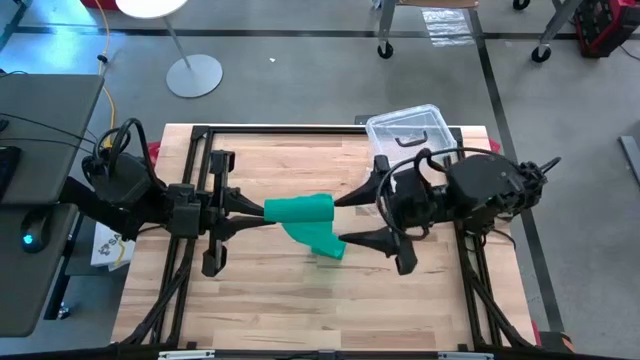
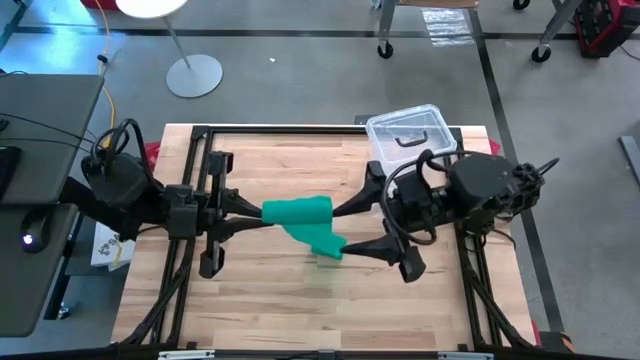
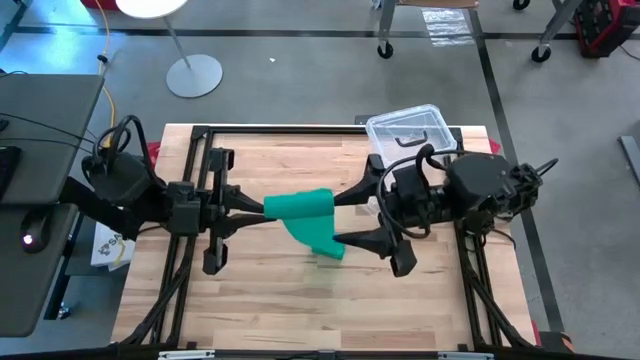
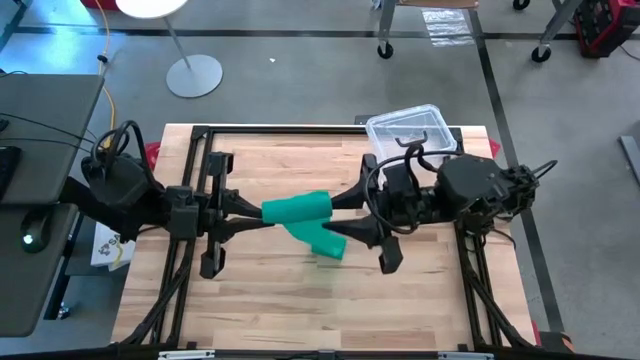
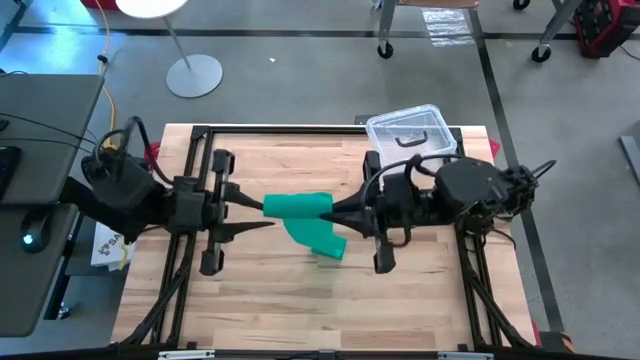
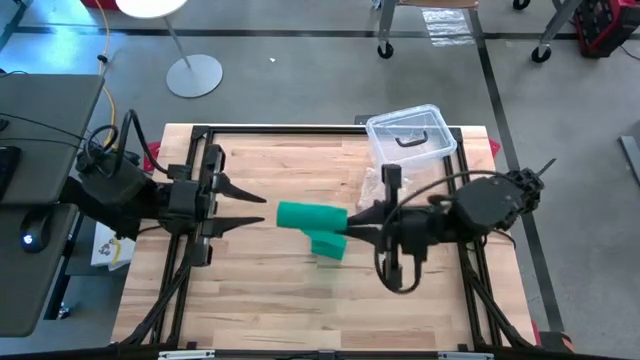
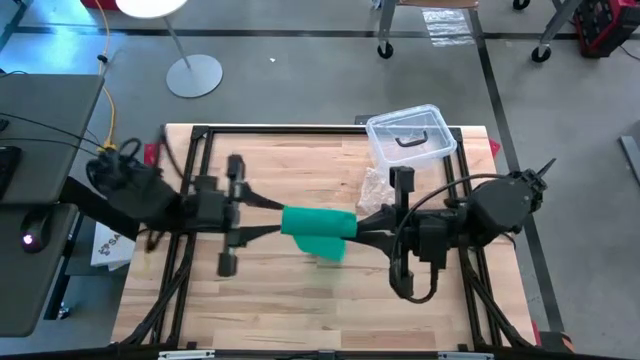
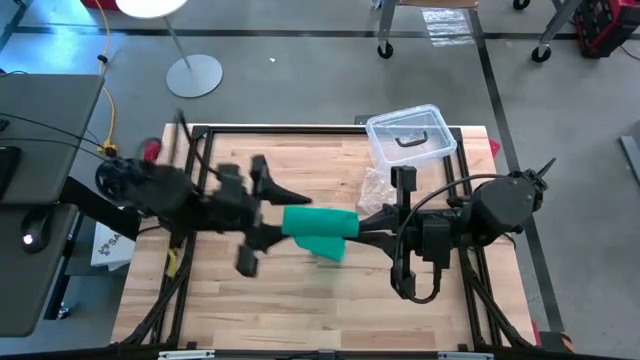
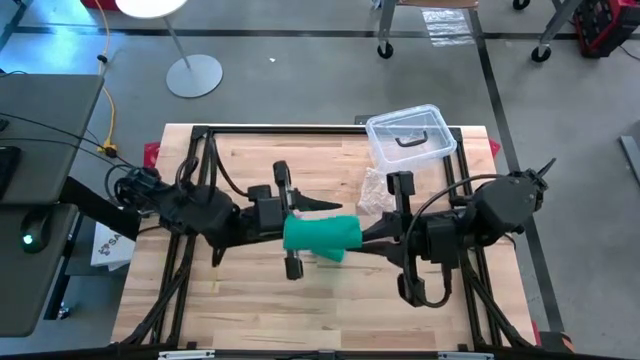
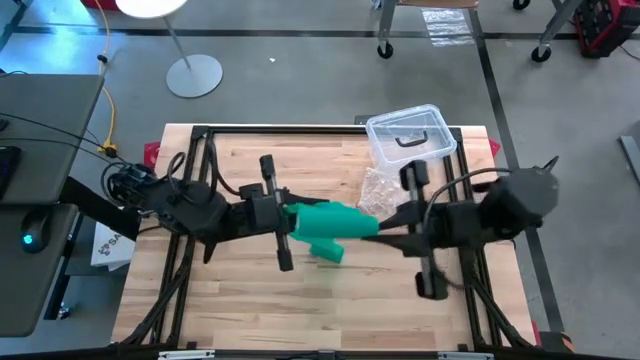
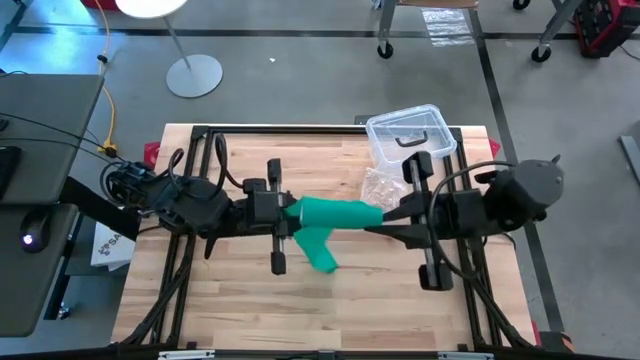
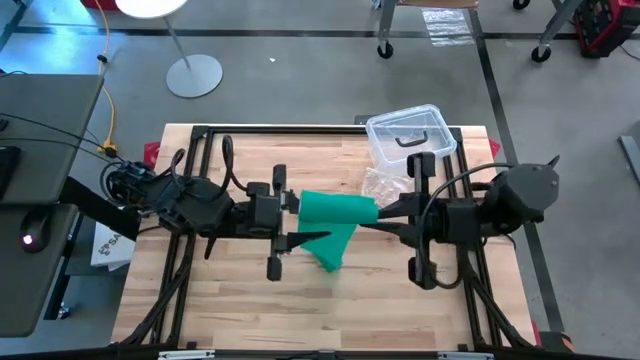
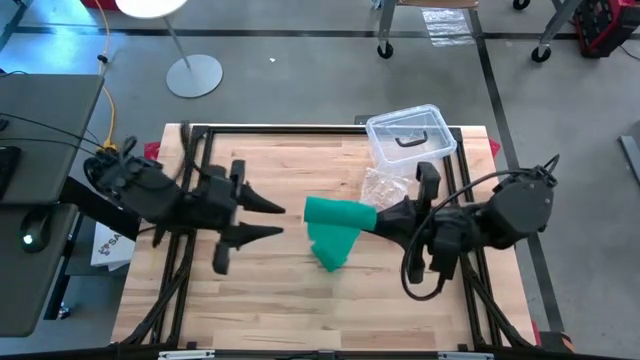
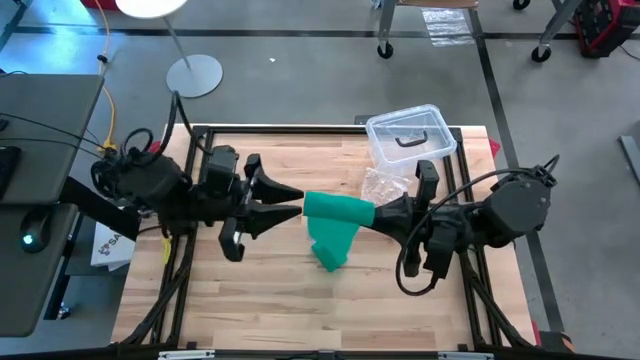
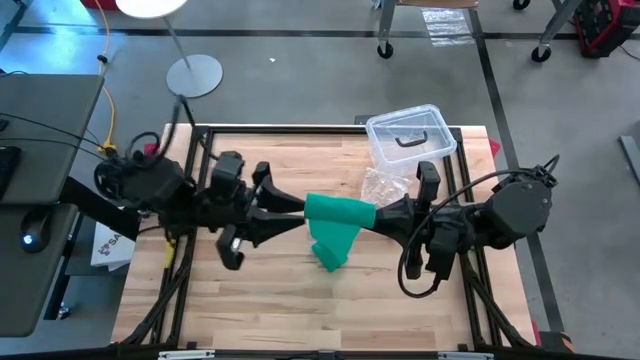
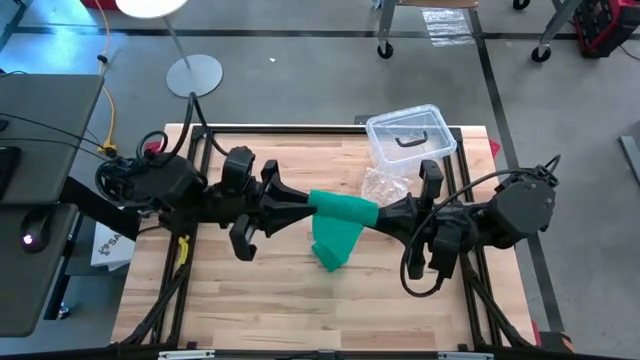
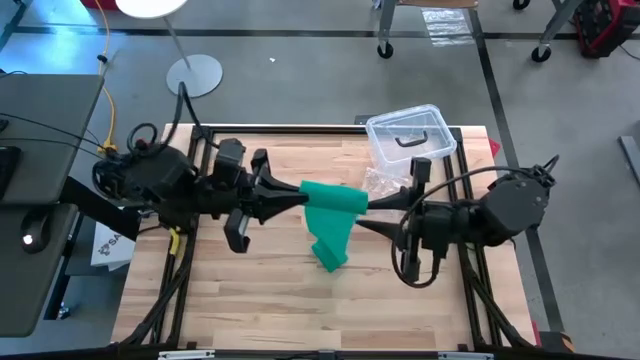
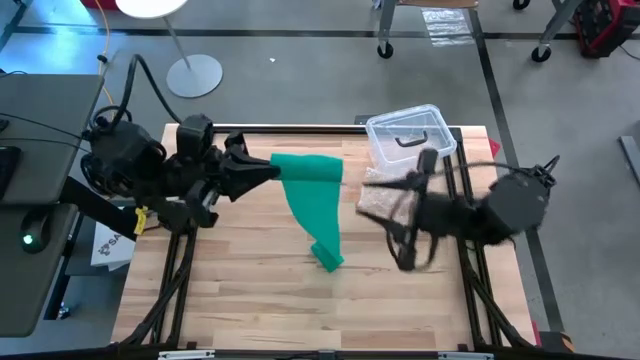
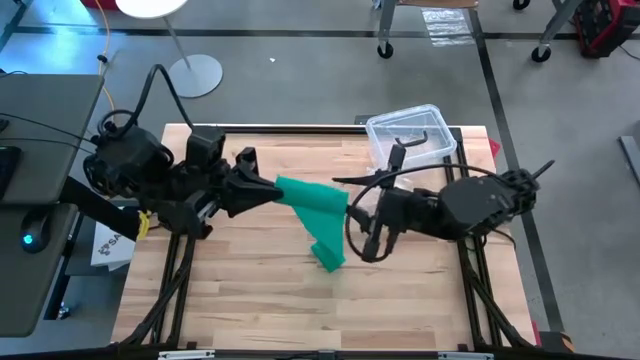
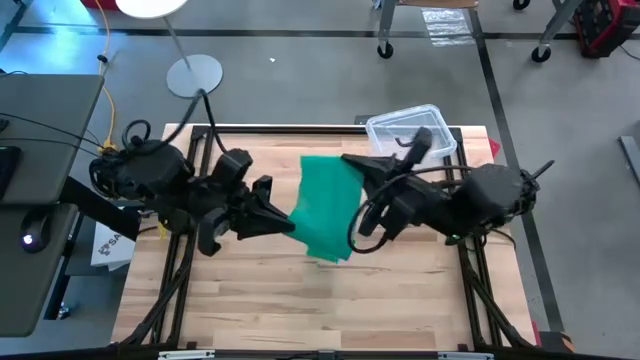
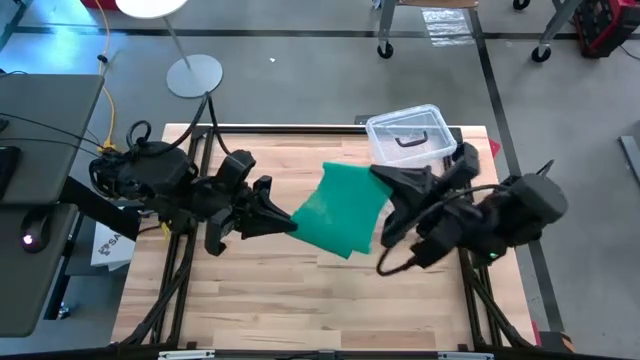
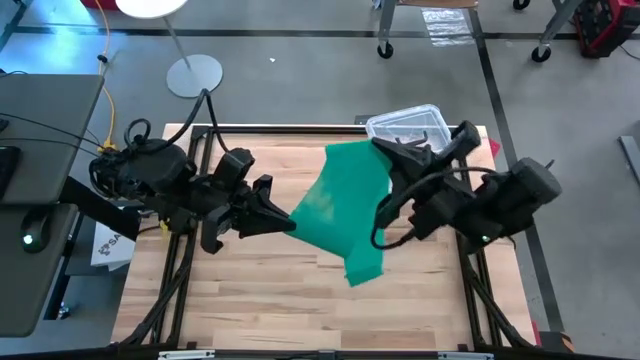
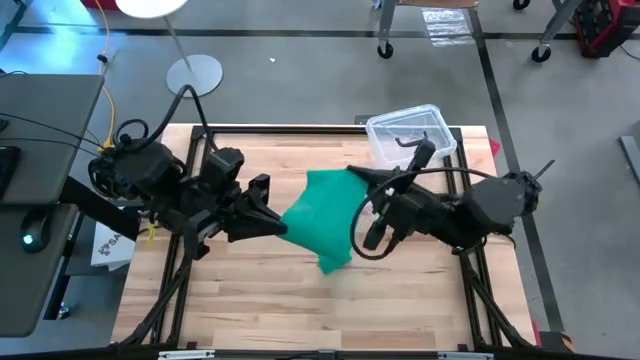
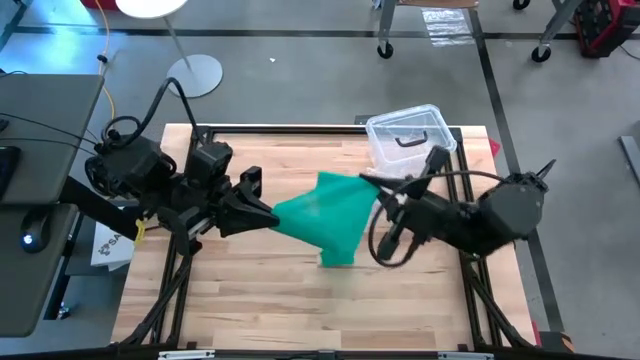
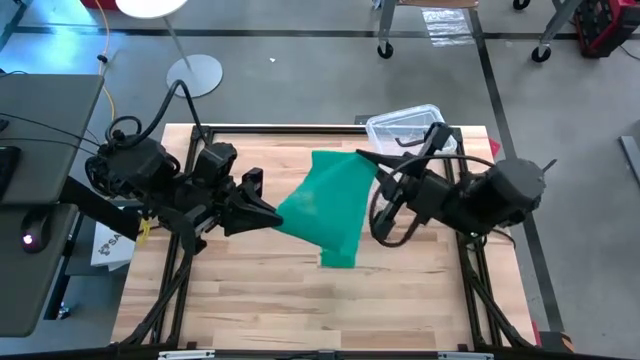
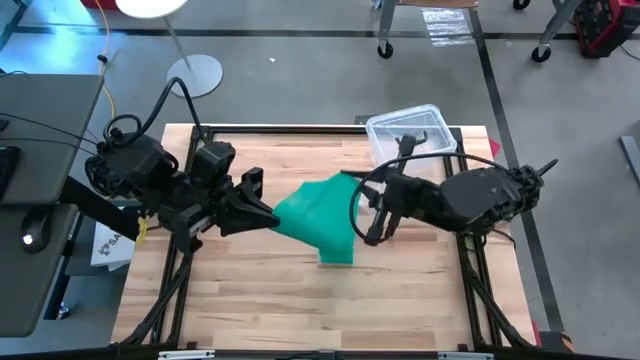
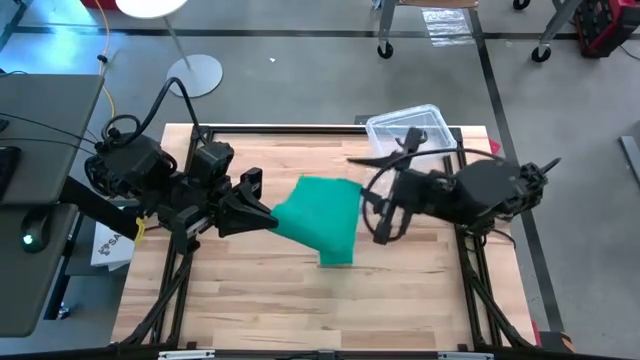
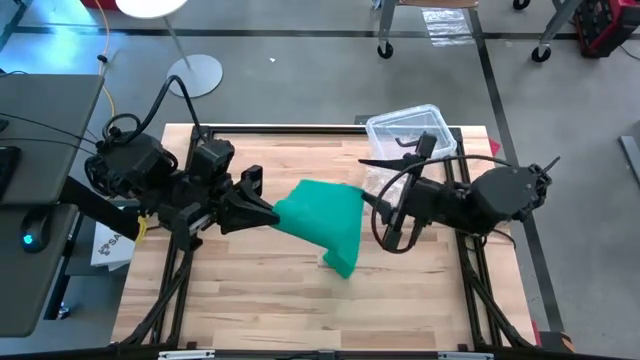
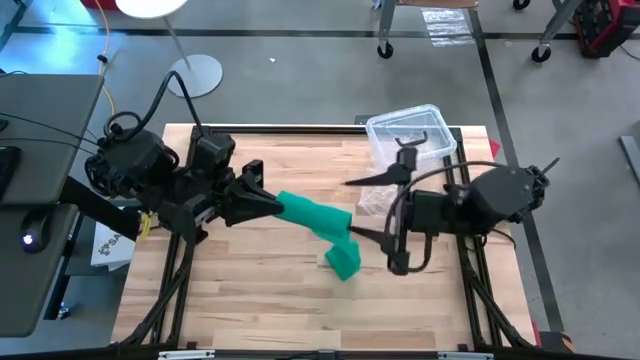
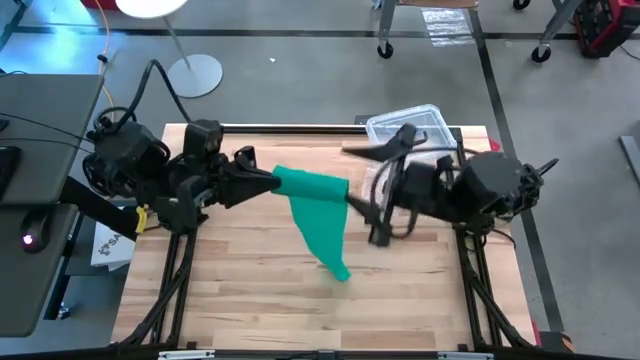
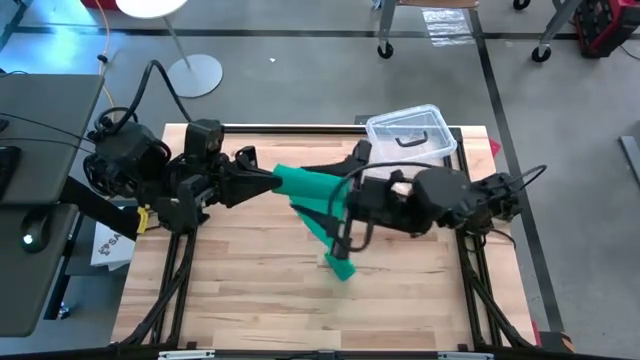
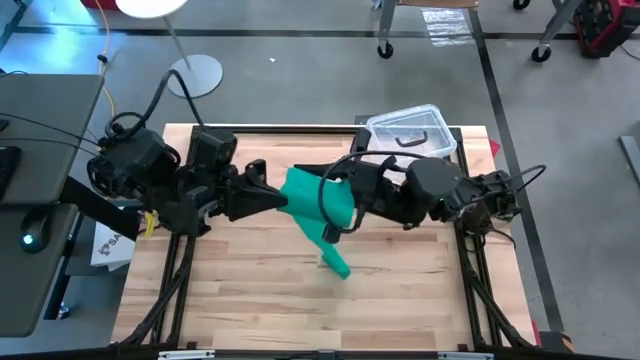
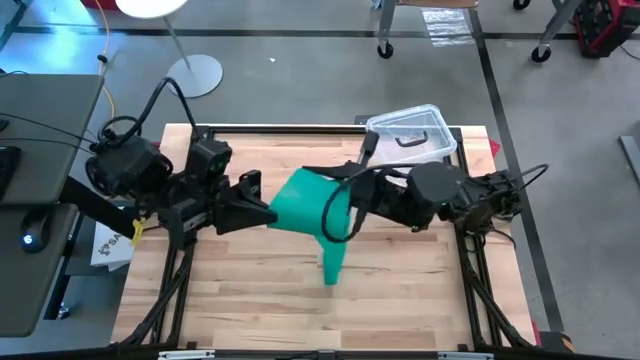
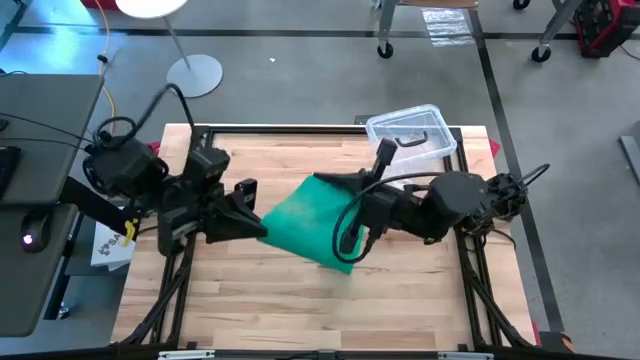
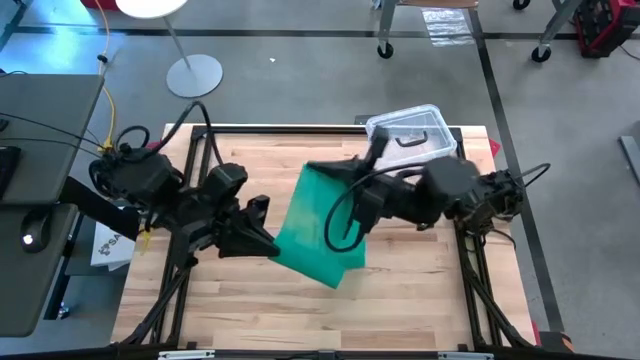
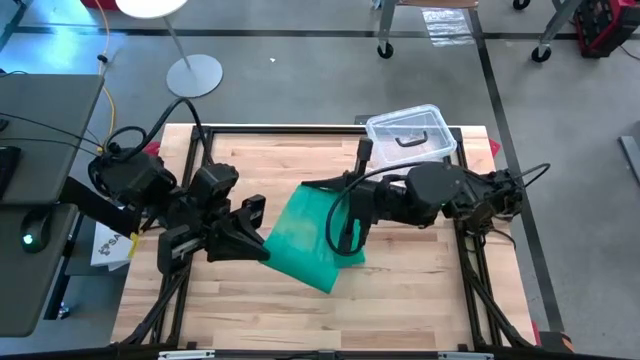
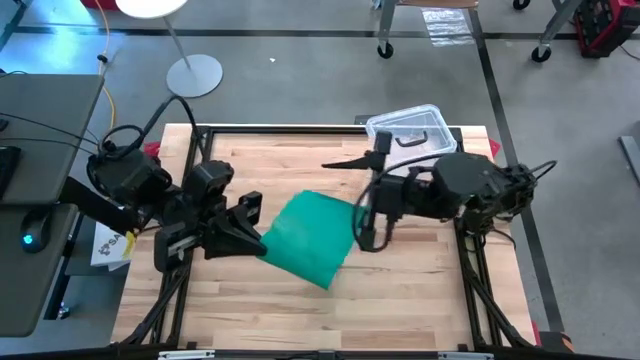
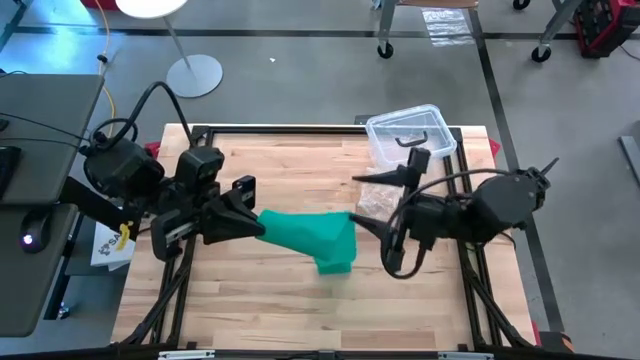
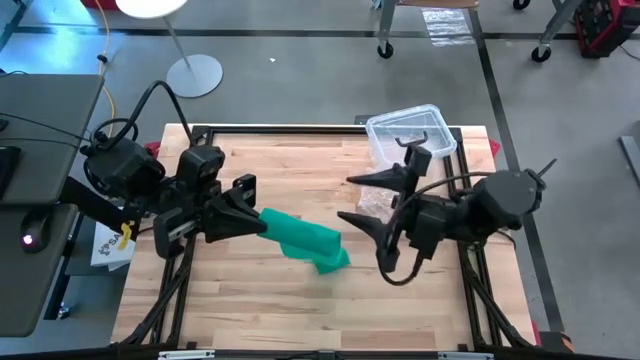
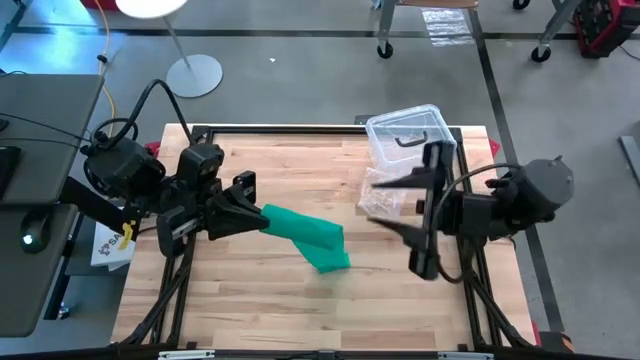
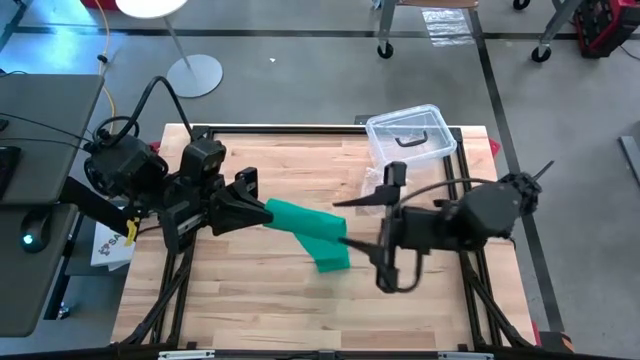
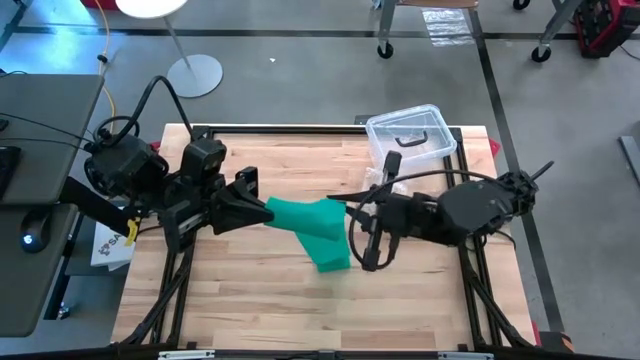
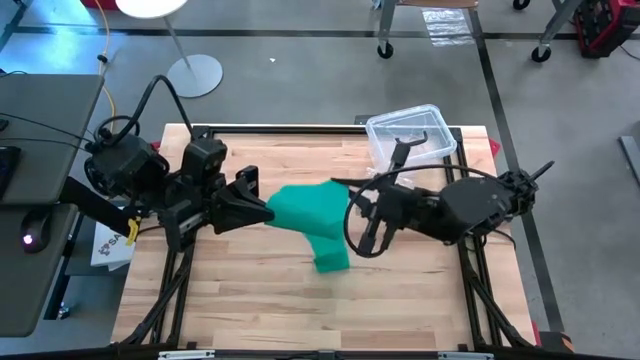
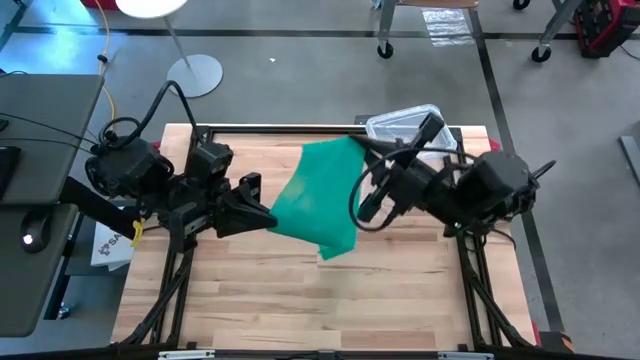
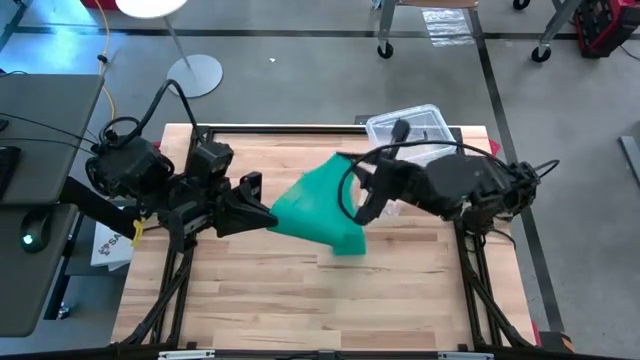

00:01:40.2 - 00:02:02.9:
Task: Roll bandage
Roll the green bandage
